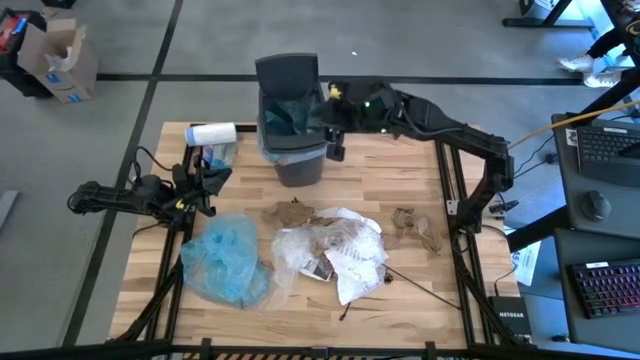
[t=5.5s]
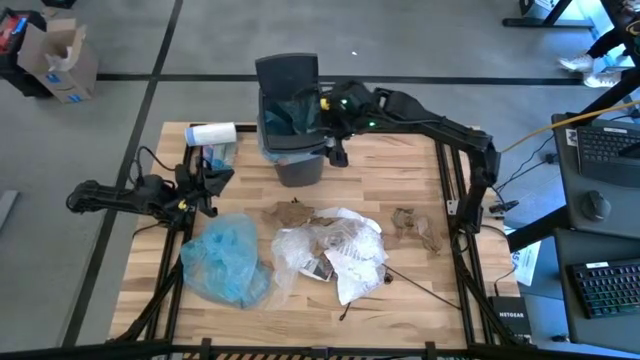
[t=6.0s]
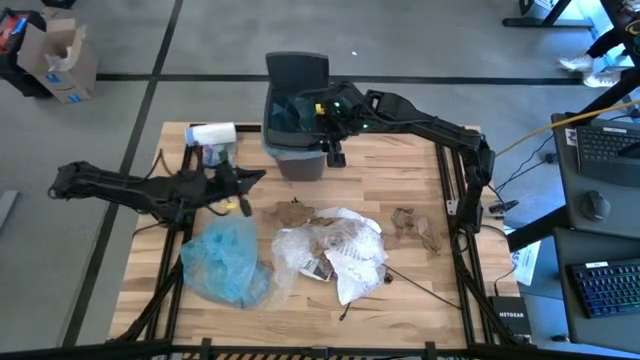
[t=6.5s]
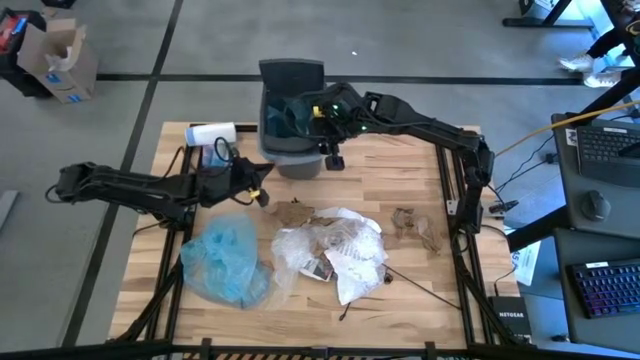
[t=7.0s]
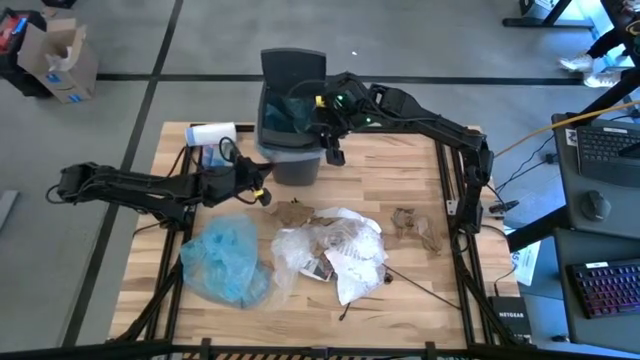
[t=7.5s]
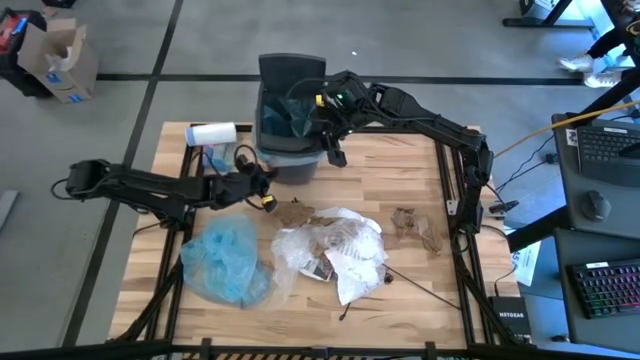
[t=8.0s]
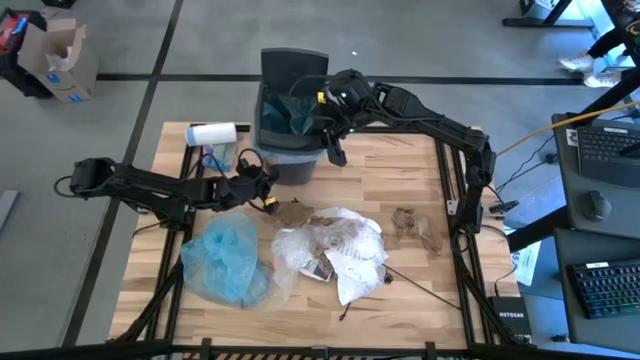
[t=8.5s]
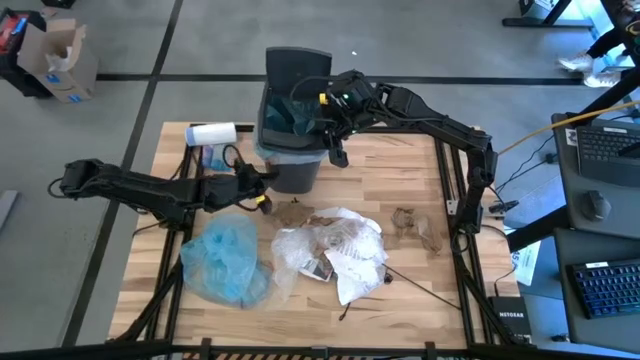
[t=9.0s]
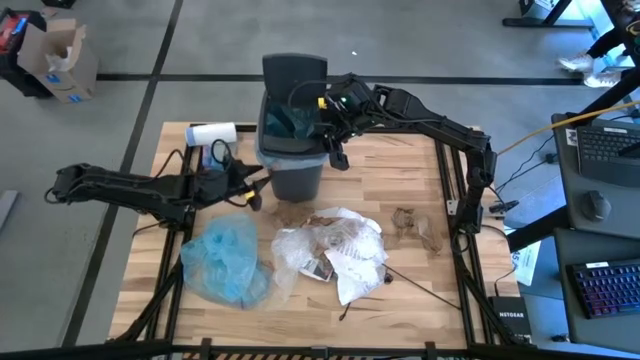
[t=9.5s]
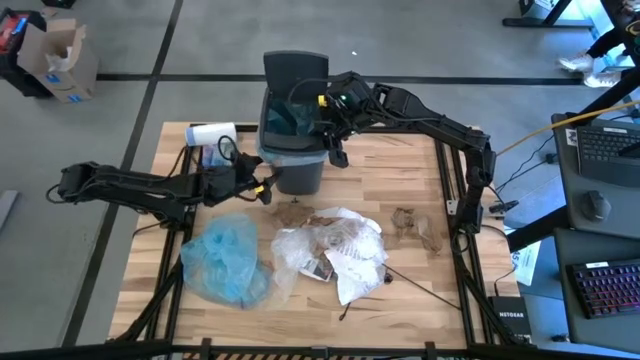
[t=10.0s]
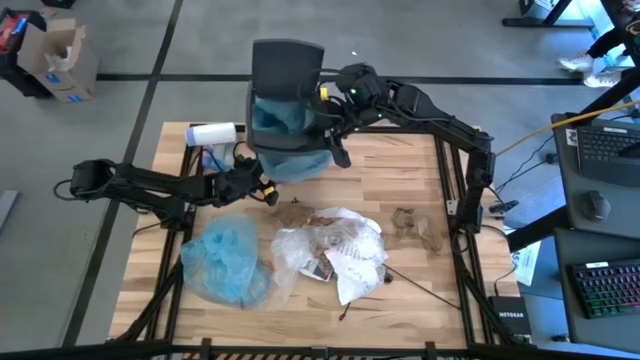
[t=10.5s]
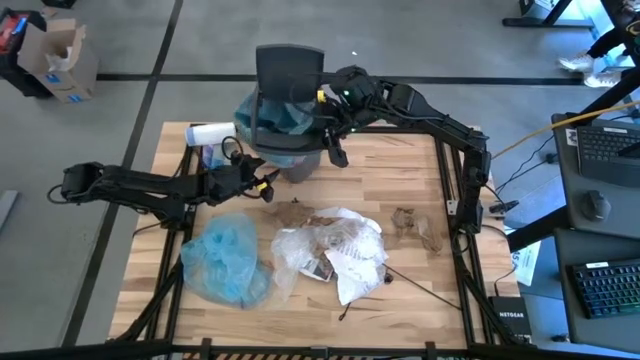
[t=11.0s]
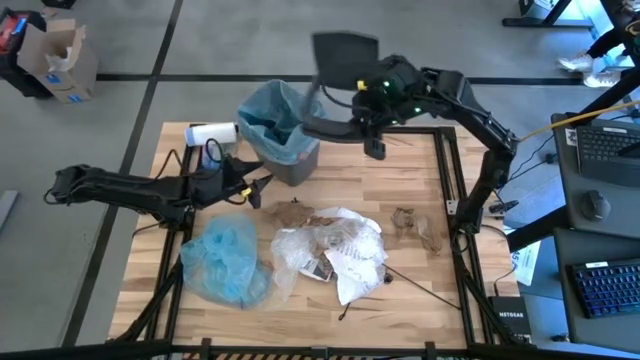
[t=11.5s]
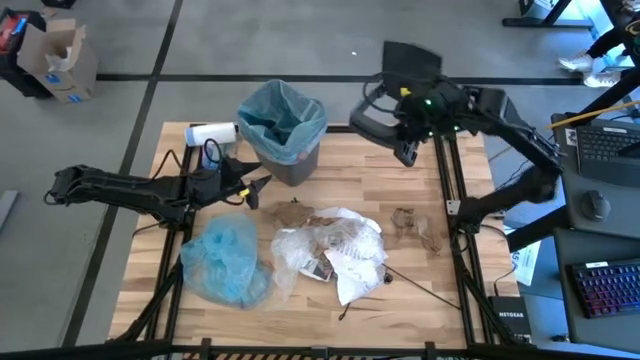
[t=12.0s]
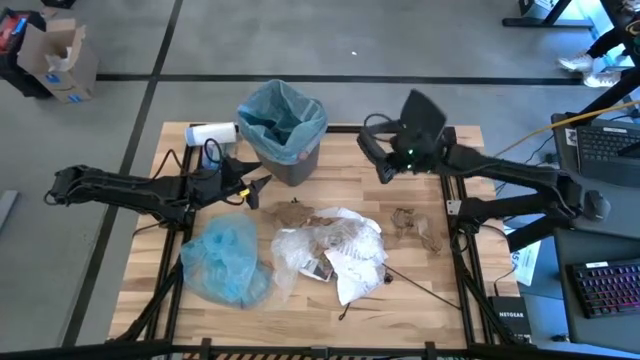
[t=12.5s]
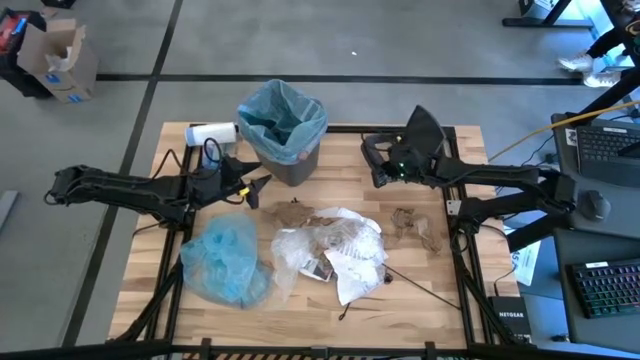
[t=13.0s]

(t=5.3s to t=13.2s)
Task: Pick and place trash into bin
Remove the trash cover from the trash bin

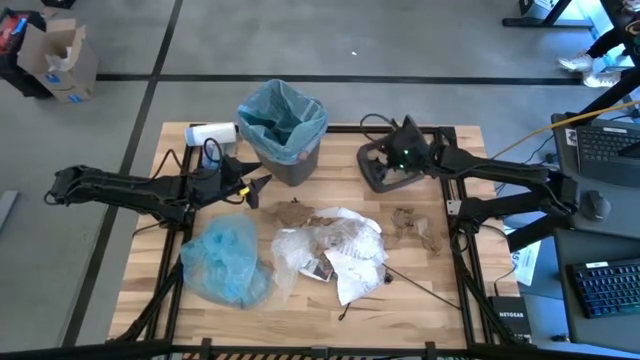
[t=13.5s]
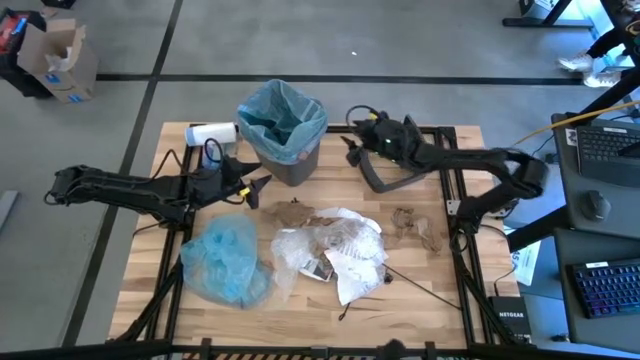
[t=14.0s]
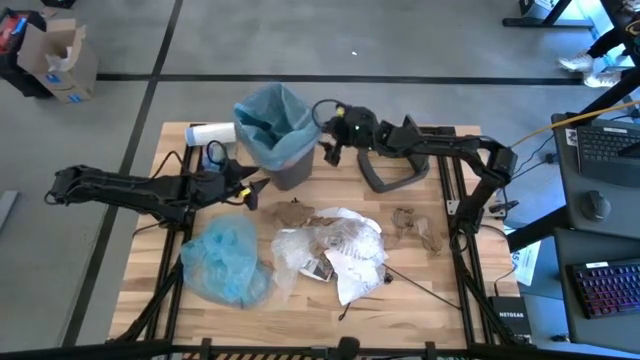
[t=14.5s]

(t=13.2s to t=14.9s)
Move the trash bin to the left of the table

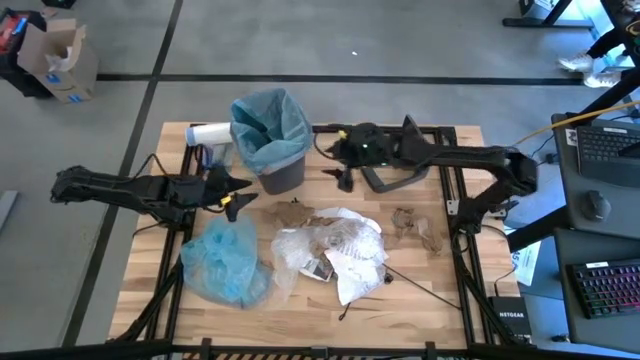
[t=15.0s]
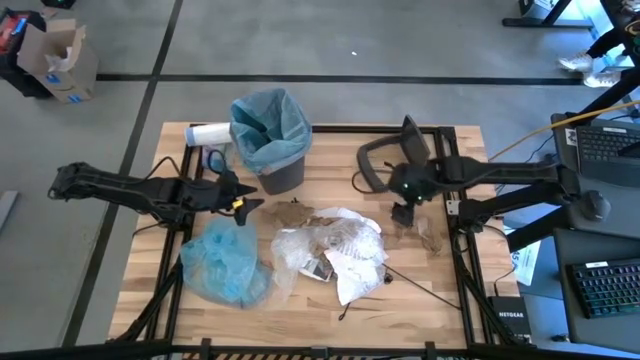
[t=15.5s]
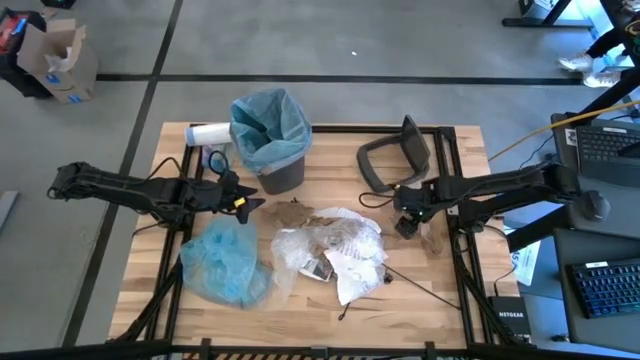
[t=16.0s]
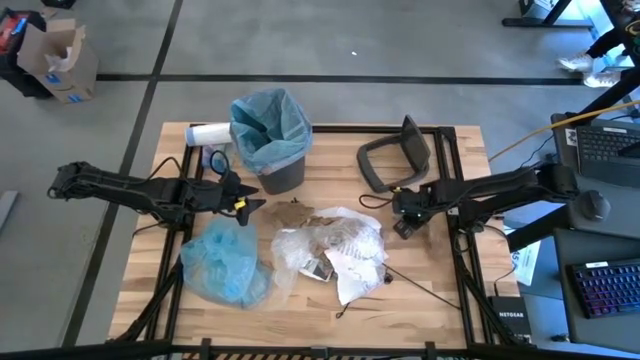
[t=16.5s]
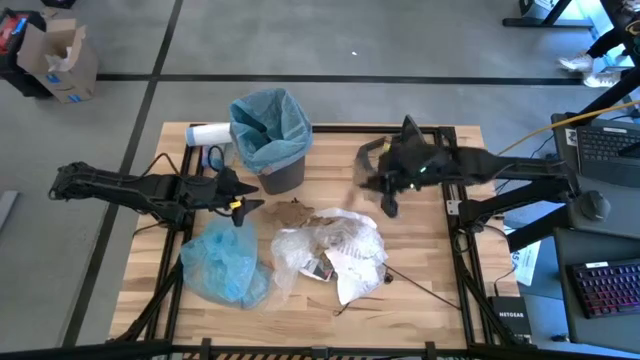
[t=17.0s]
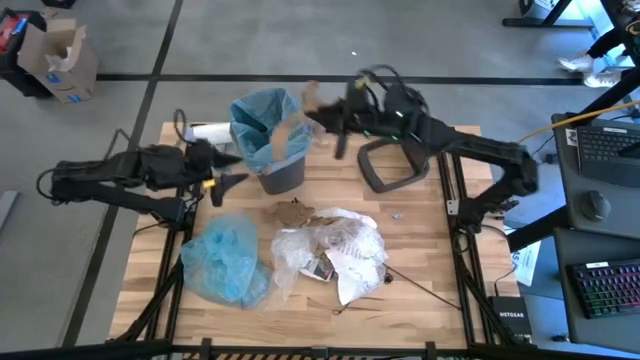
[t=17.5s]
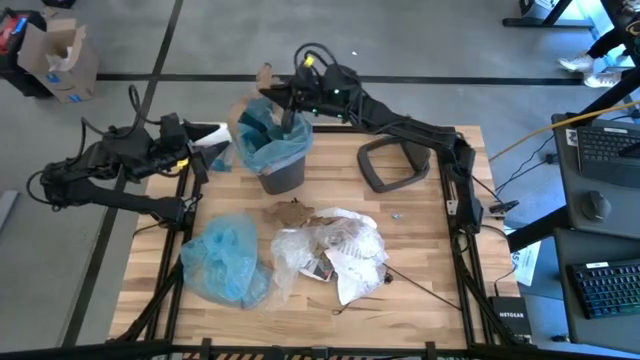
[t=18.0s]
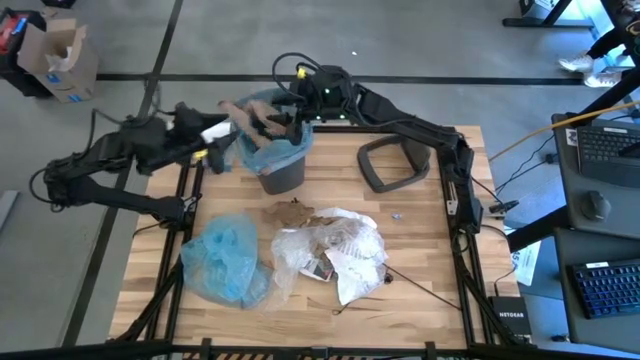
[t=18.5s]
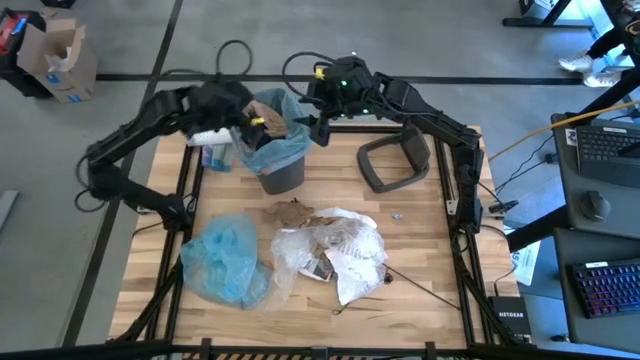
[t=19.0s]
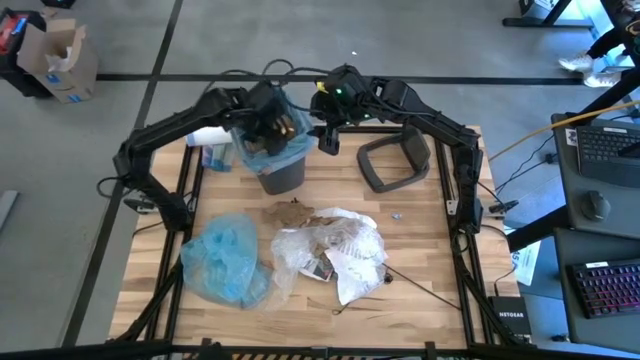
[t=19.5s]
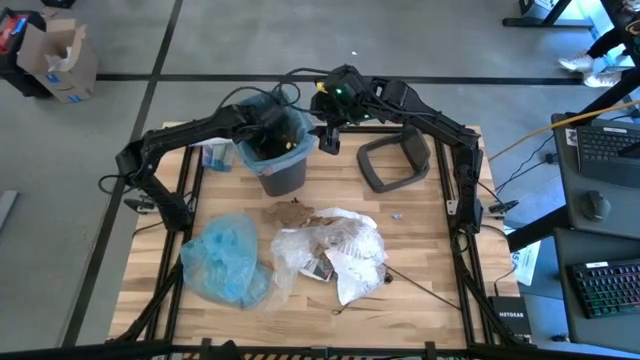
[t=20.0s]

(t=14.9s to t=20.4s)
Put the brown napkin into the trash bin

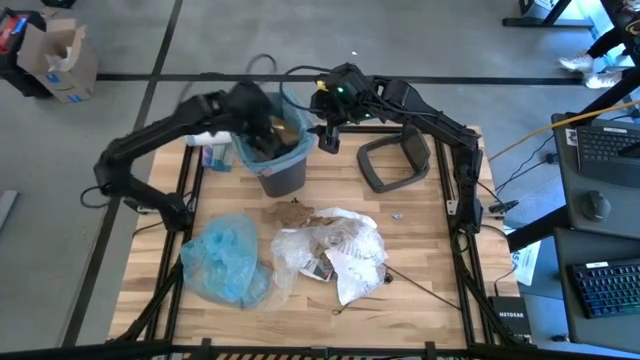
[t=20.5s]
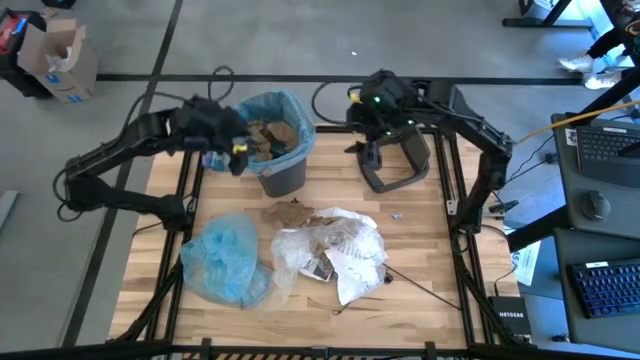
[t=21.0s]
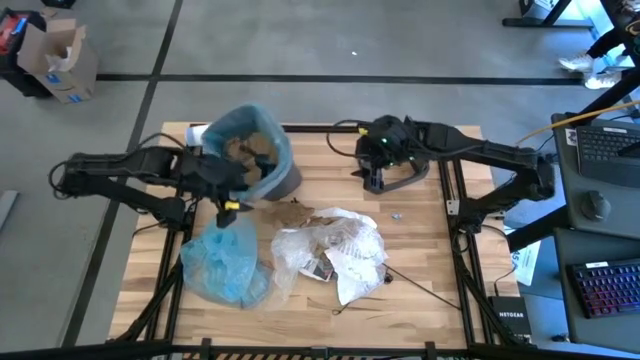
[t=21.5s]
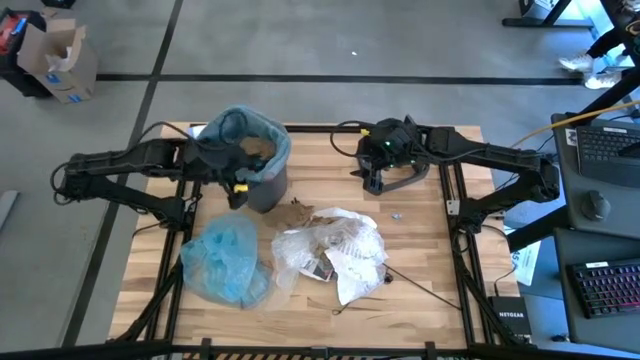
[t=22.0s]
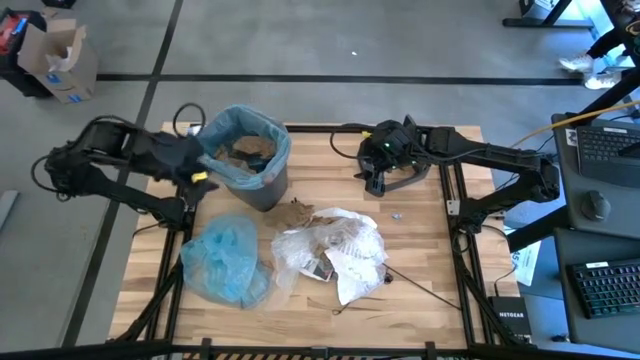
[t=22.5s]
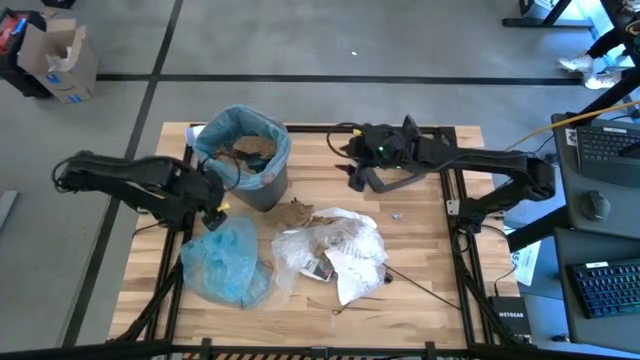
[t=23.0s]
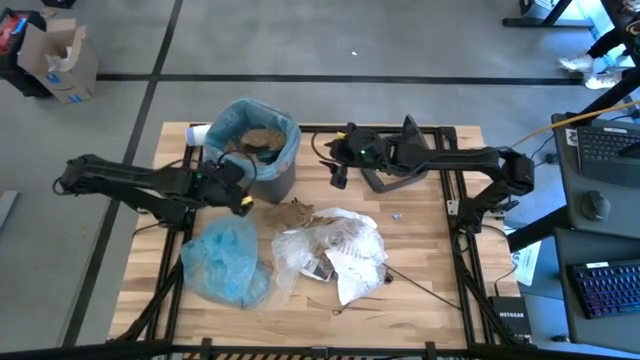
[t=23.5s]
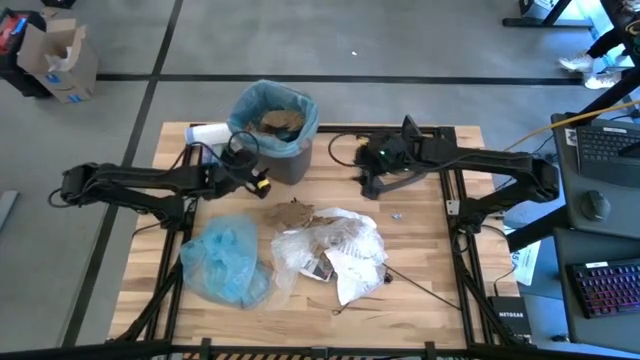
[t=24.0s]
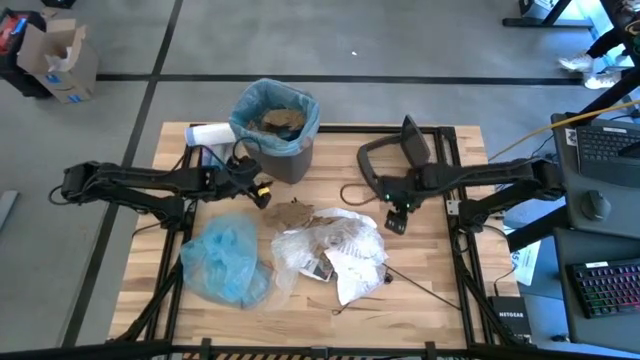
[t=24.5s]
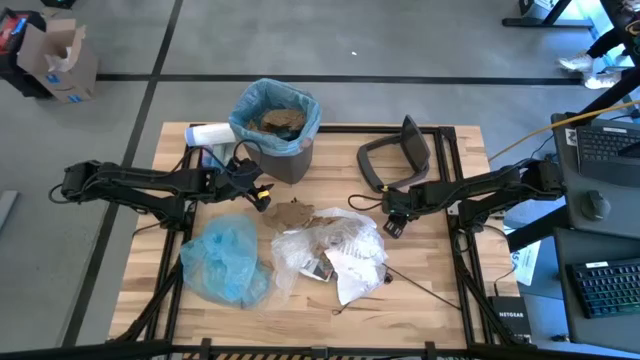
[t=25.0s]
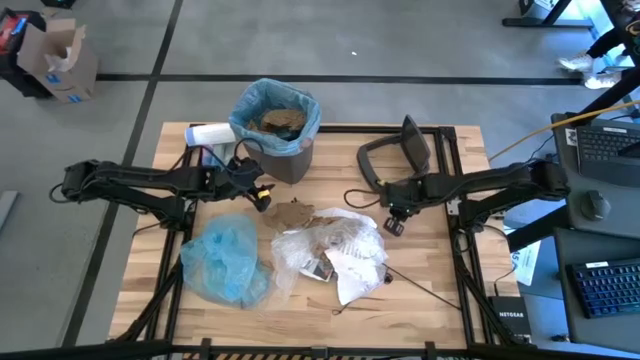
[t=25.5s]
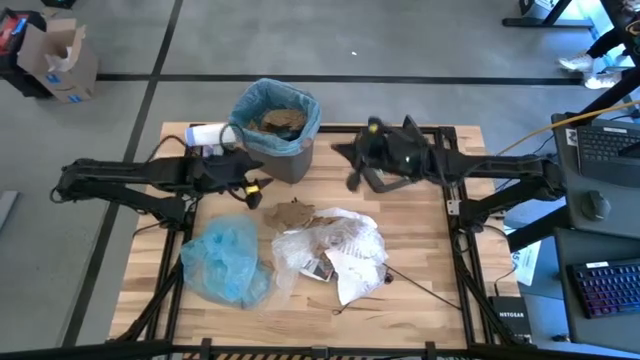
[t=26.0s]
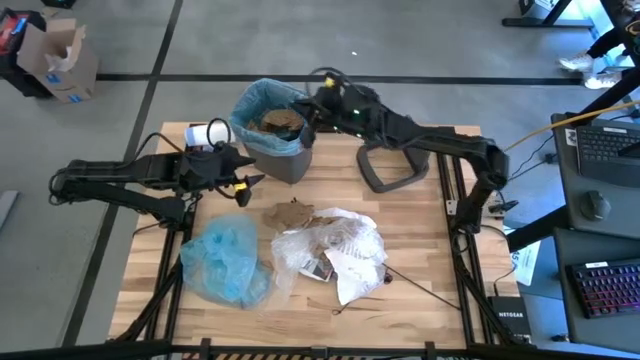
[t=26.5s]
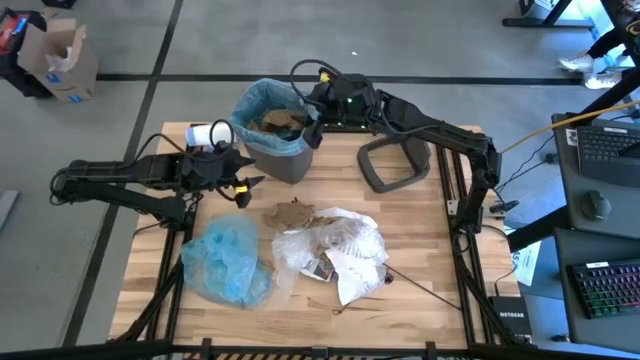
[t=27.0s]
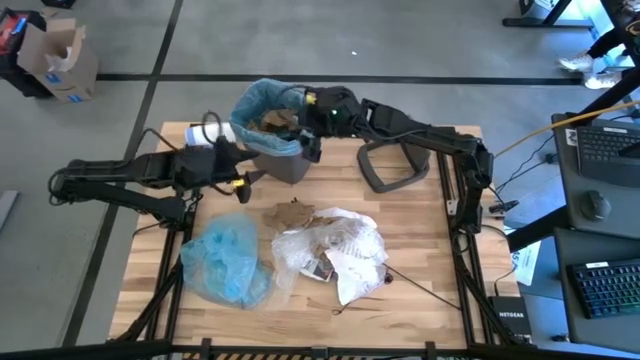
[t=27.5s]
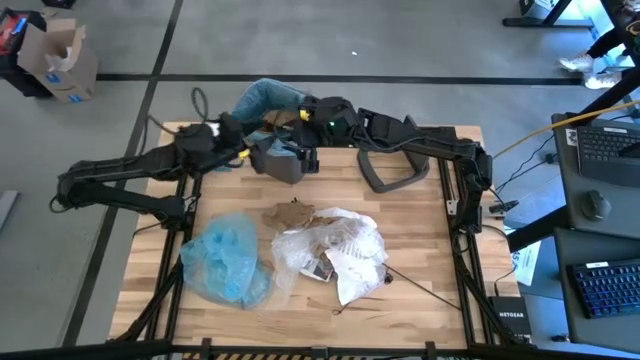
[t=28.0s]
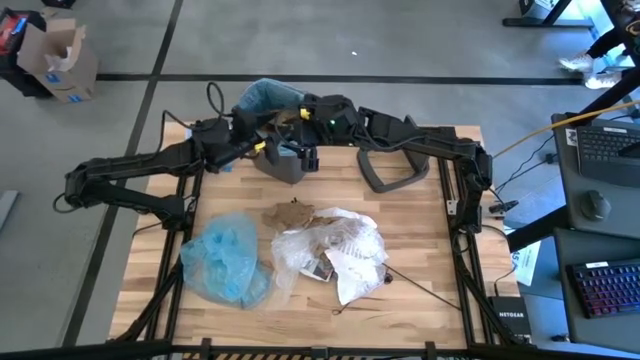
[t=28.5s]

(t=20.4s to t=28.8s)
Put the blue paper into the trash bin
